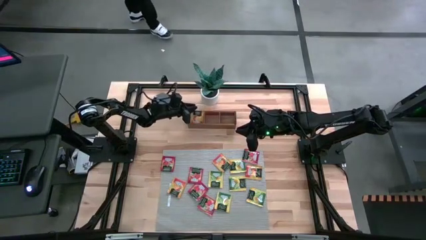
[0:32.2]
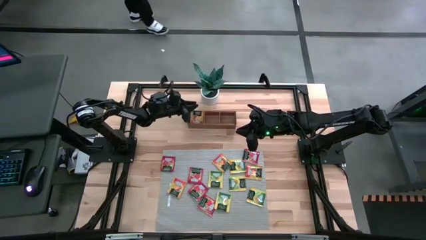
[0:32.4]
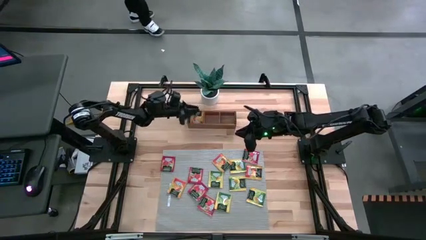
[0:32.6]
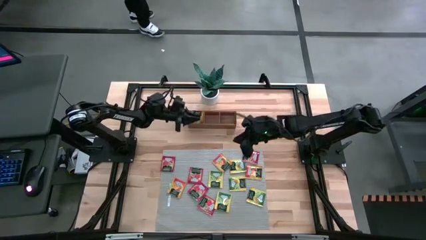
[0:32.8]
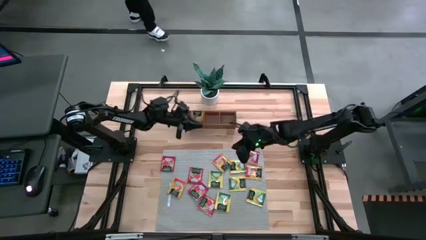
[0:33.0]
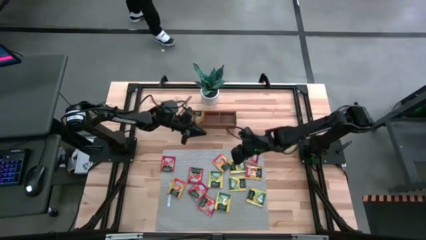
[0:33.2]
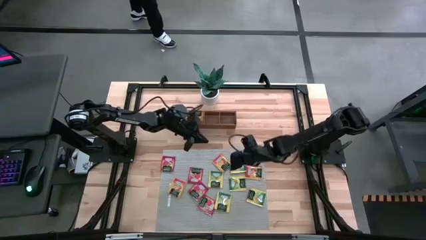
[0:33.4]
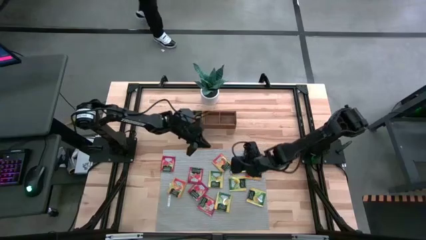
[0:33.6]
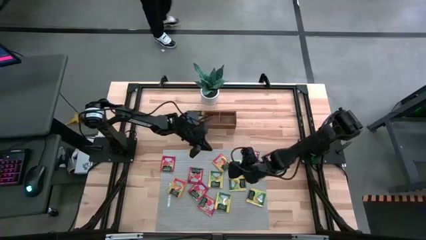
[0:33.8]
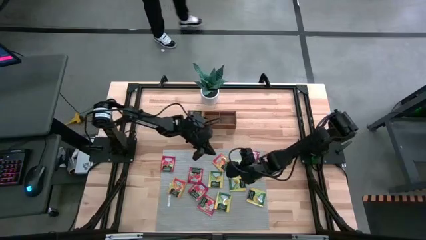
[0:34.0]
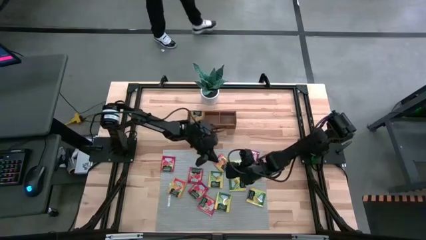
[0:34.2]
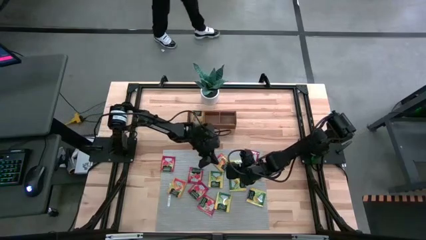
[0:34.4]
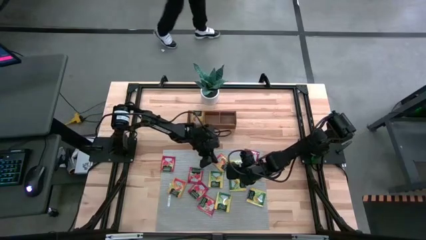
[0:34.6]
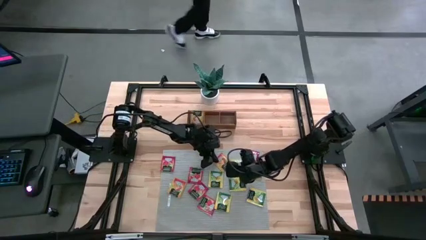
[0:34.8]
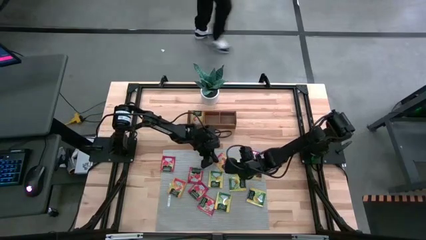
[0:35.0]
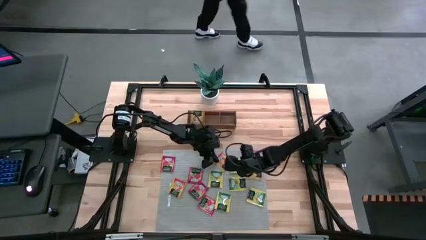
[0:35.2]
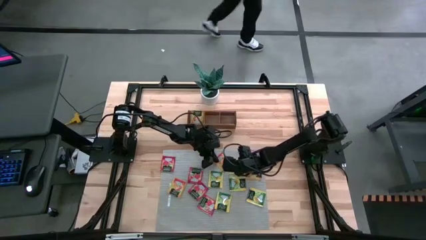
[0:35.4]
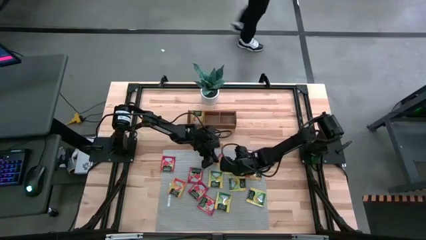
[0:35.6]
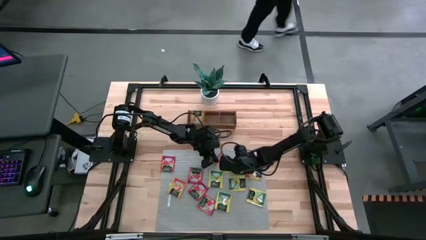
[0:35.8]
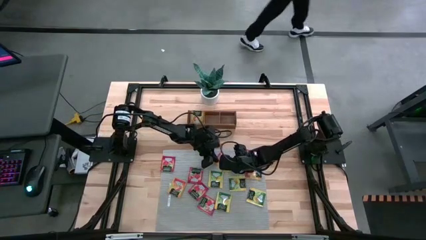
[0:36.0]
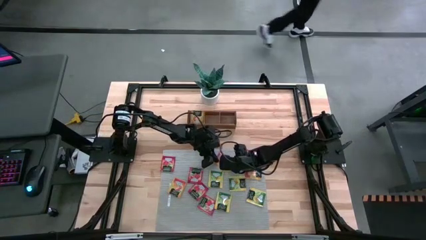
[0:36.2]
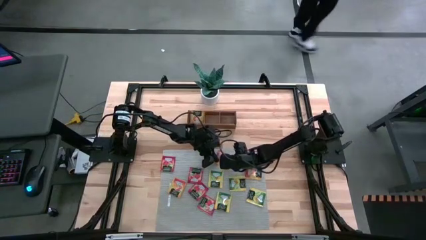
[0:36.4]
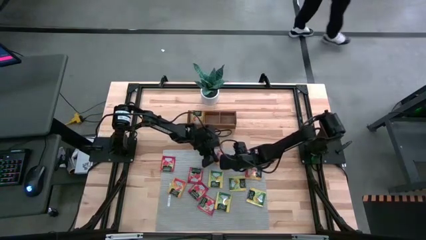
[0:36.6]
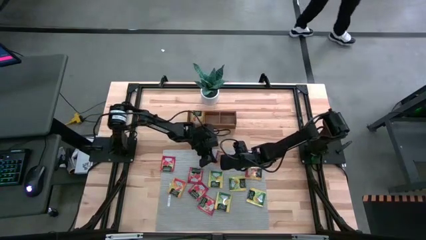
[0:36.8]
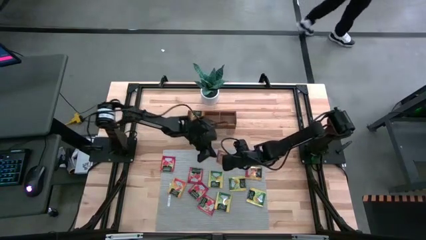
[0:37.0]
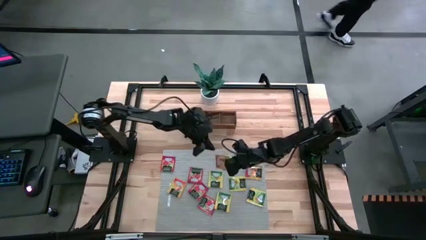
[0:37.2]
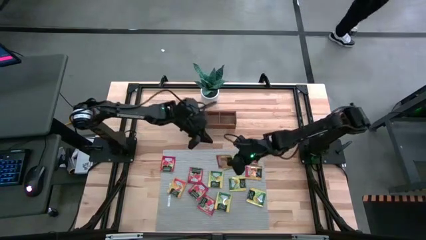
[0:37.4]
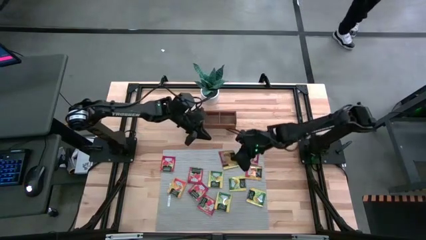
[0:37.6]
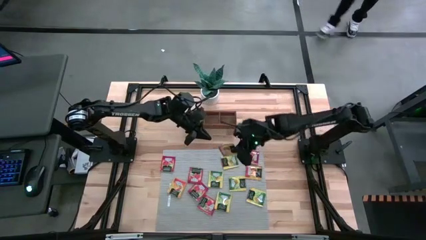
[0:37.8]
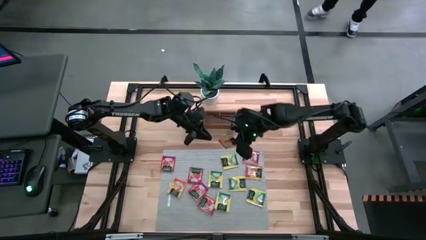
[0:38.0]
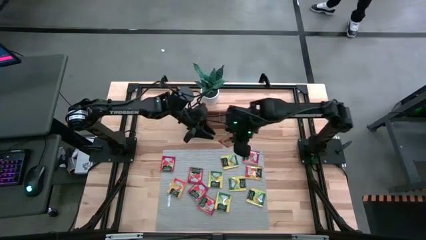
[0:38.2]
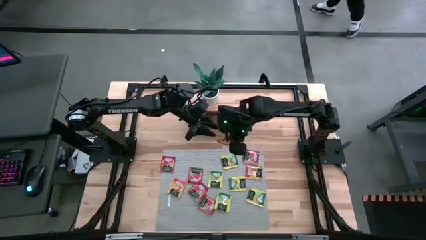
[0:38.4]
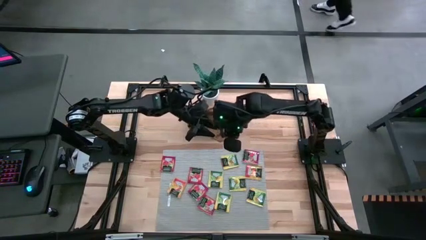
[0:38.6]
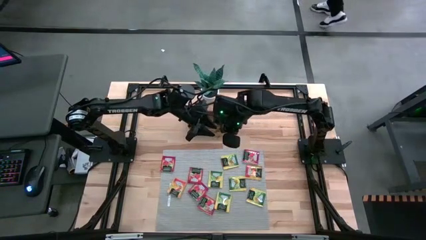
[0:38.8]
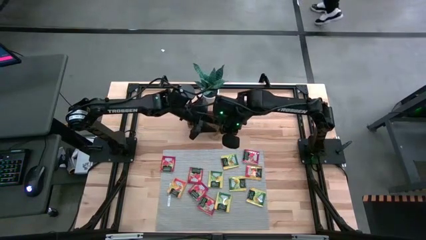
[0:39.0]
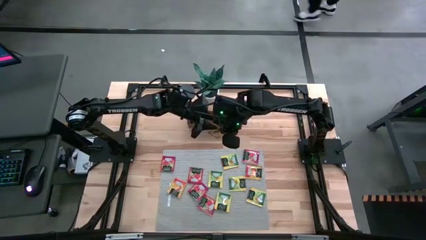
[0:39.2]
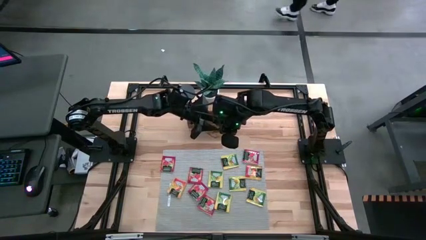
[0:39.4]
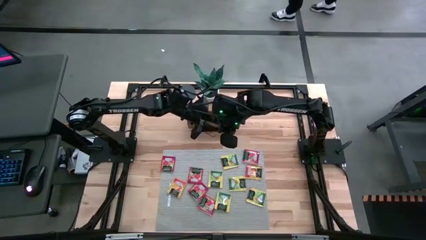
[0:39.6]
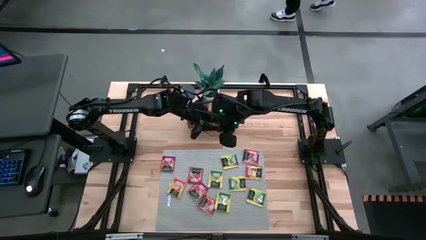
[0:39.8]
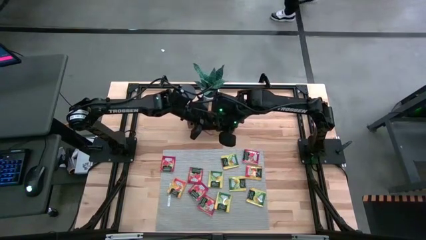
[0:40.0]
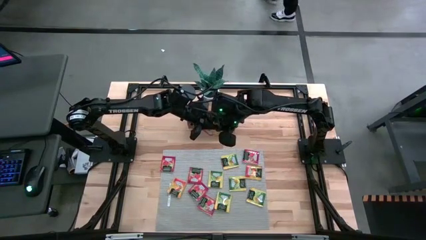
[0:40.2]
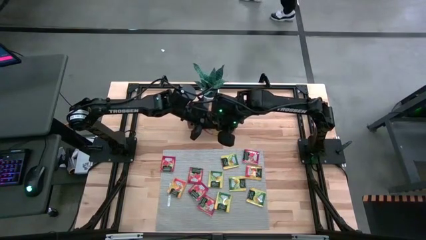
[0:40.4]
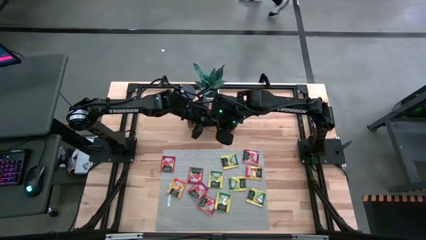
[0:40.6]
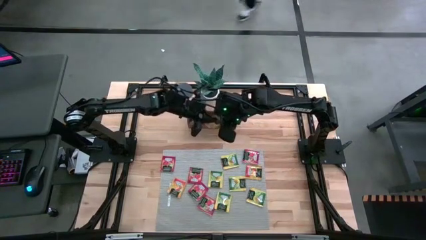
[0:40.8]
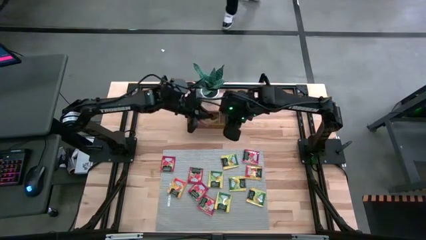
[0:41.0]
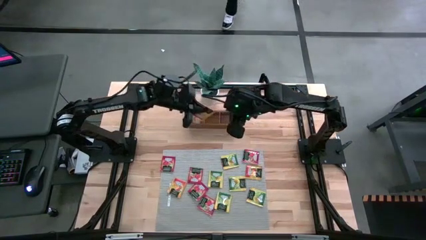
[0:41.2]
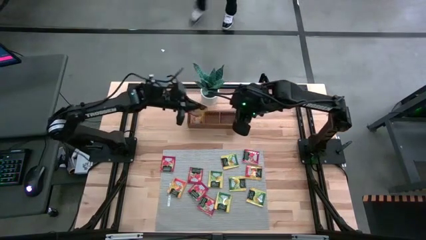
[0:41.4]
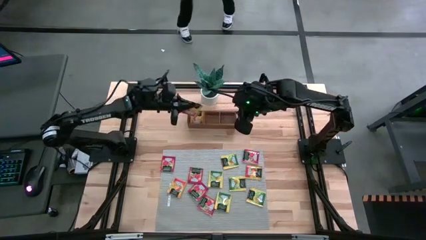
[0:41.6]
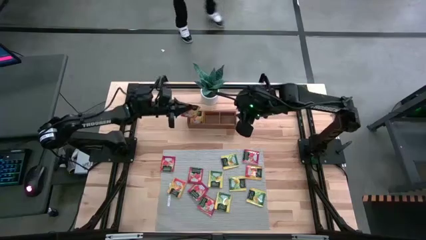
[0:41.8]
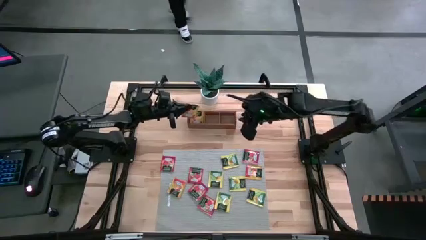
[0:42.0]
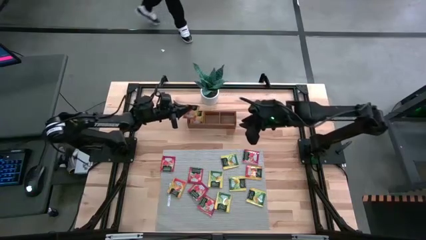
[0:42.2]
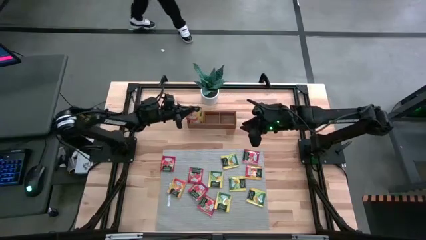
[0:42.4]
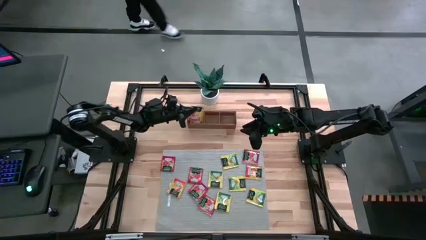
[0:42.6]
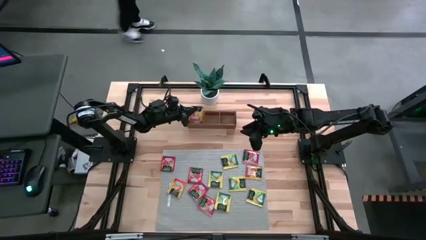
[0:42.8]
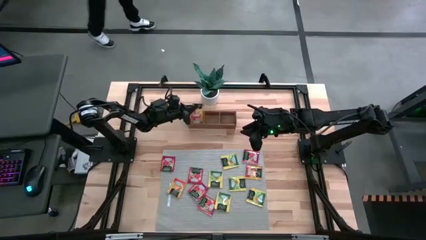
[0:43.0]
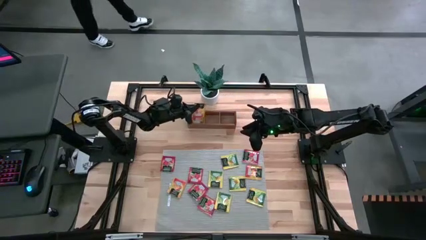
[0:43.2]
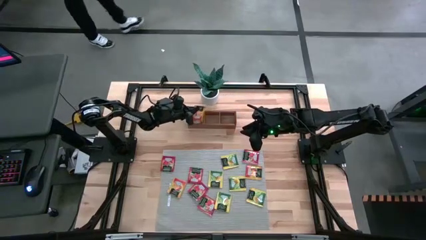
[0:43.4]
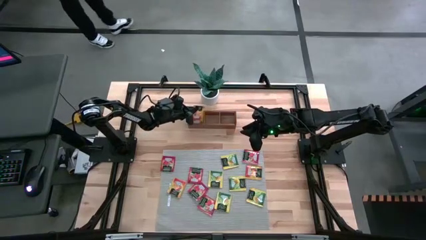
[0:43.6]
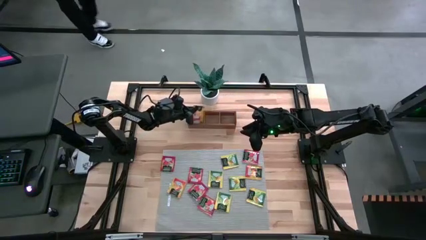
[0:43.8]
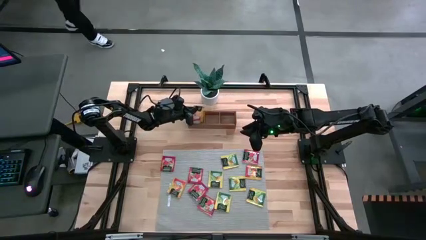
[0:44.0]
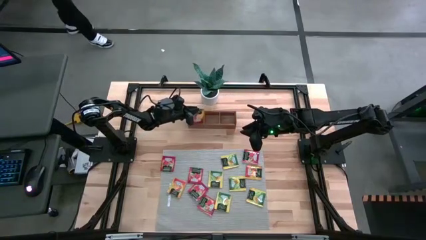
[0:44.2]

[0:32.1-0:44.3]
Task: Pick & Place Tea
Put the orange tea bag into the left section of the wooden organizer
